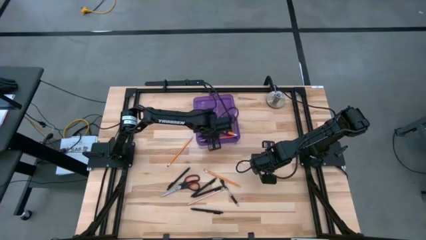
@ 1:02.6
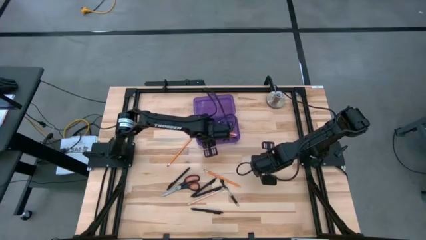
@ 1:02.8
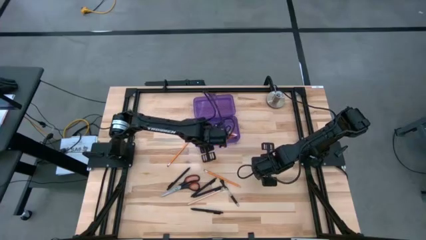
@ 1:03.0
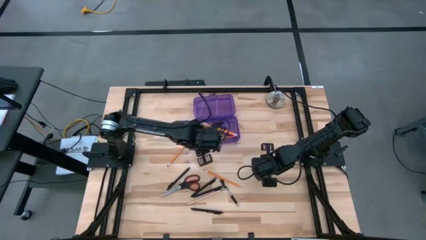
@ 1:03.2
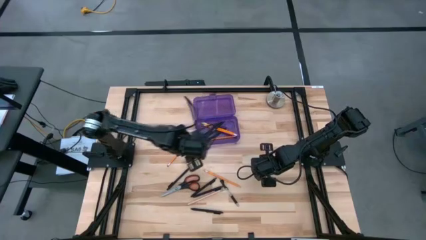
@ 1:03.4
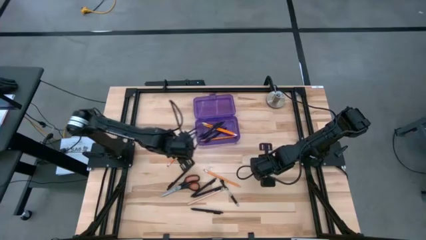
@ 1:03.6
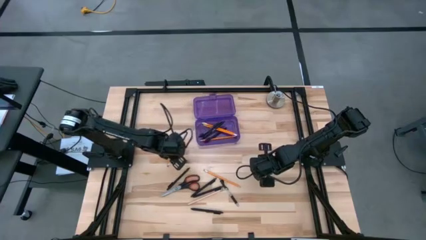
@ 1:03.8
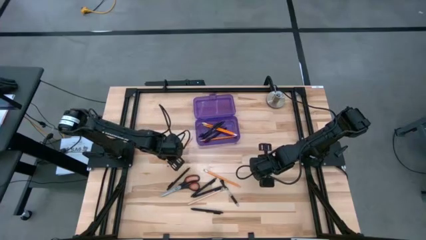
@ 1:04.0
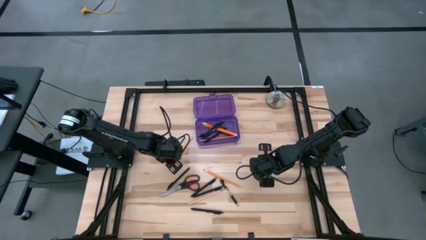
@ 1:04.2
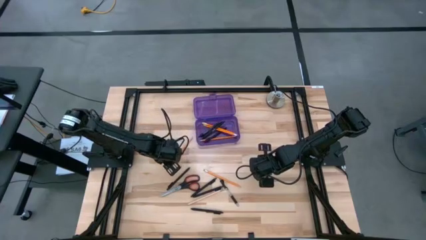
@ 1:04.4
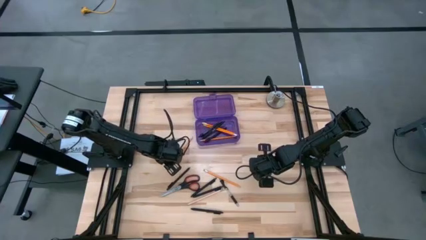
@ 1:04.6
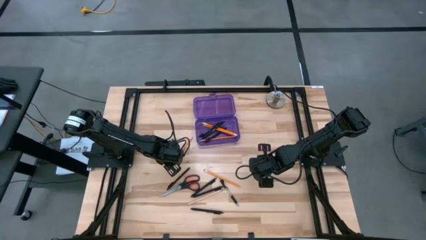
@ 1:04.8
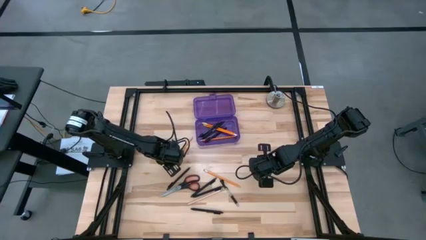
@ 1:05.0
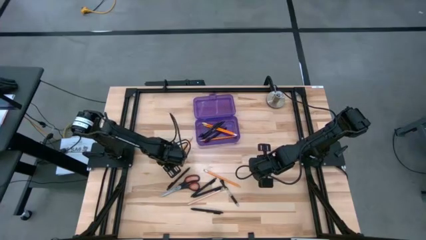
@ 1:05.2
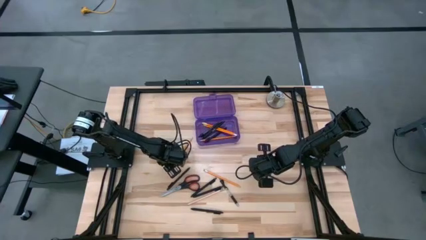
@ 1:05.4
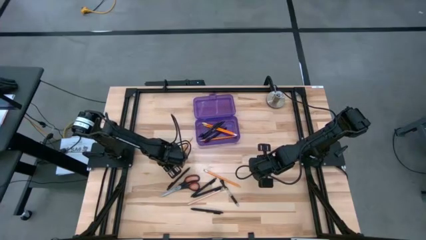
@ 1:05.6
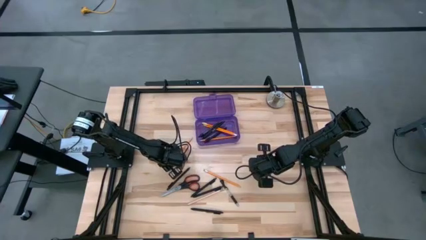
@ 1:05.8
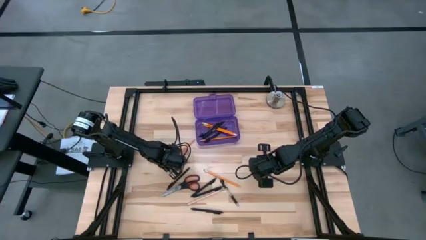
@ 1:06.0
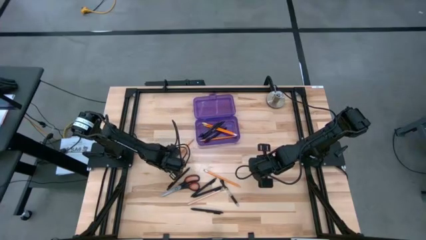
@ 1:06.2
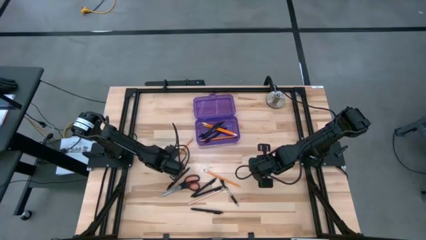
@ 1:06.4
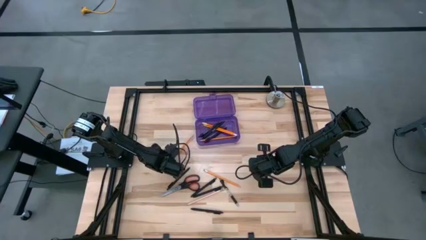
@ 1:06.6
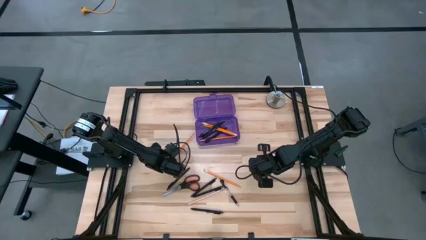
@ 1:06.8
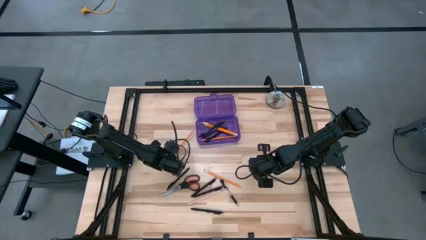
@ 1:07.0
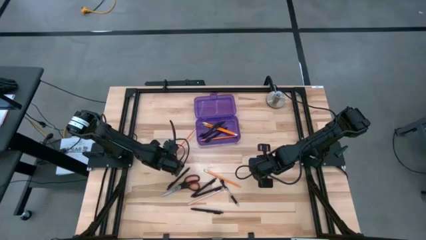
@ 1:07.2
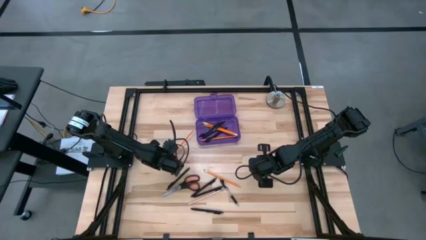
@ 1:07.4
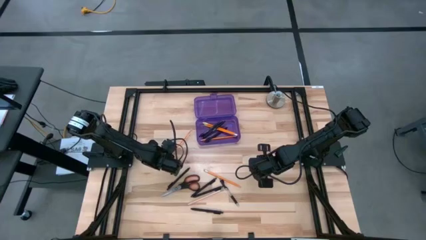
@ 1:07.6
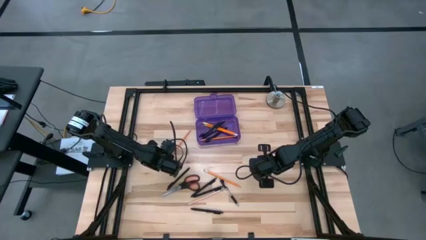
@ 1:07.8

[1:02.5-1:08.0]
Task: Pick & place school supplies into a supply box
Put the yellow pencil into the purple supply box

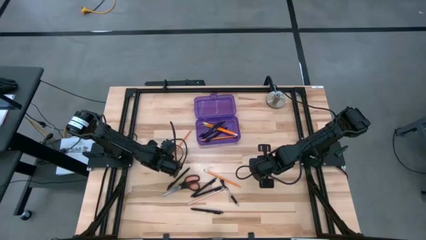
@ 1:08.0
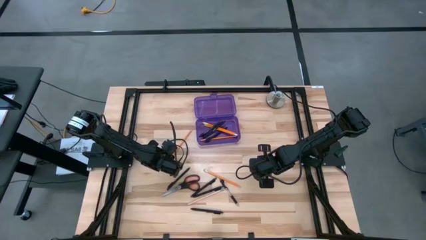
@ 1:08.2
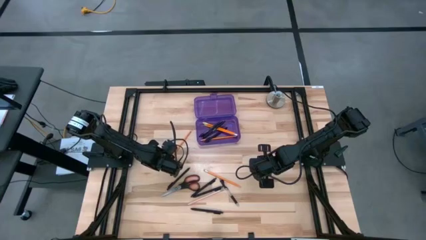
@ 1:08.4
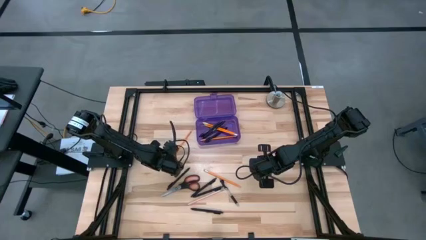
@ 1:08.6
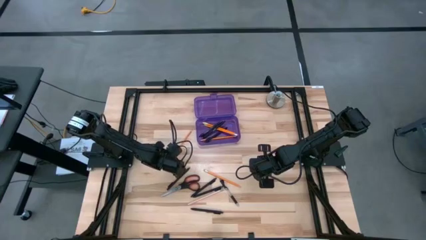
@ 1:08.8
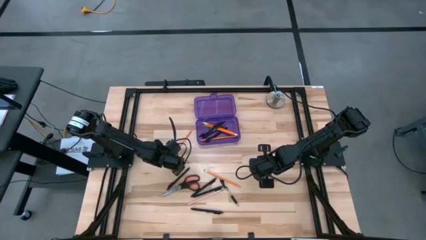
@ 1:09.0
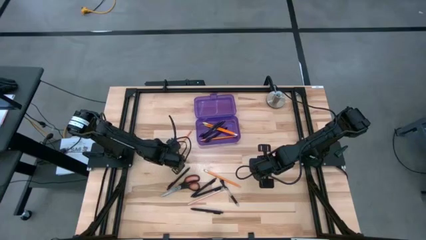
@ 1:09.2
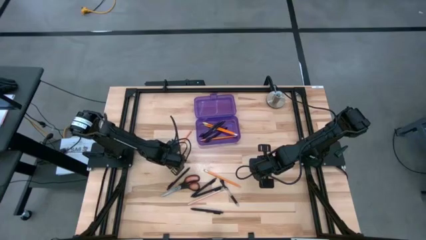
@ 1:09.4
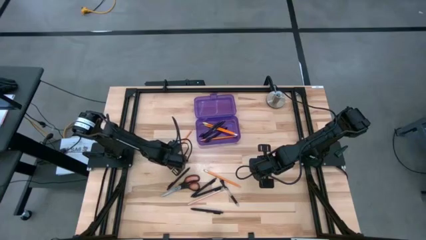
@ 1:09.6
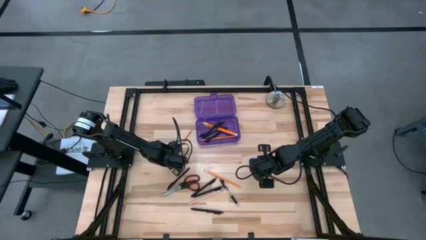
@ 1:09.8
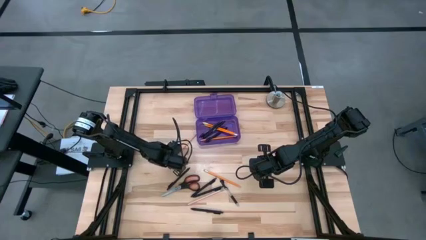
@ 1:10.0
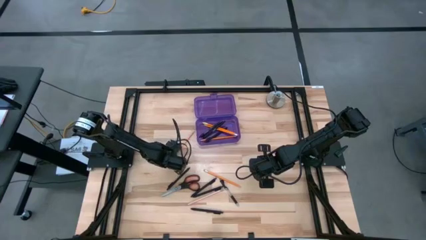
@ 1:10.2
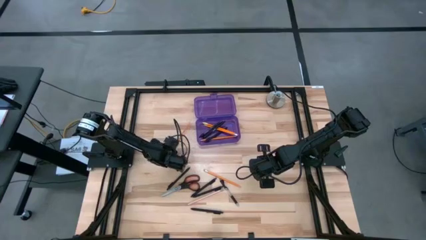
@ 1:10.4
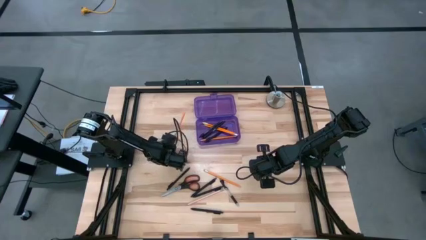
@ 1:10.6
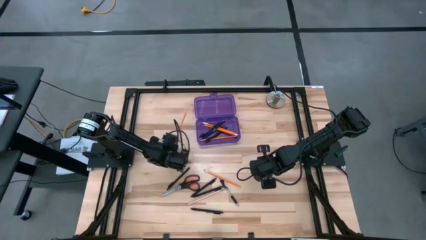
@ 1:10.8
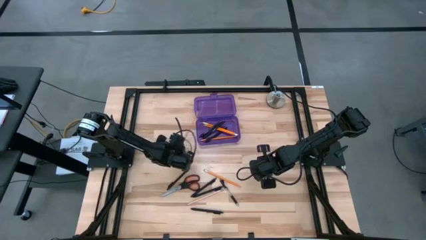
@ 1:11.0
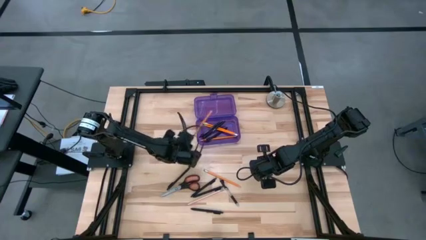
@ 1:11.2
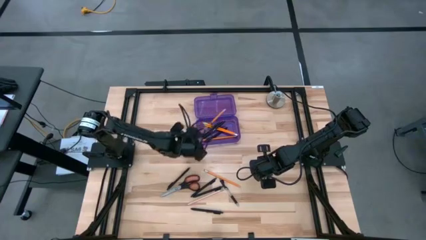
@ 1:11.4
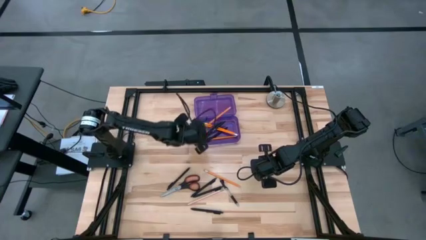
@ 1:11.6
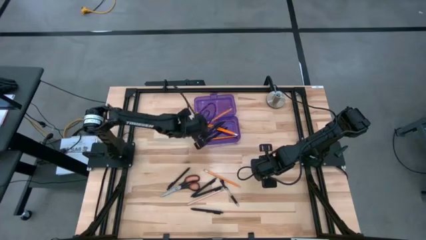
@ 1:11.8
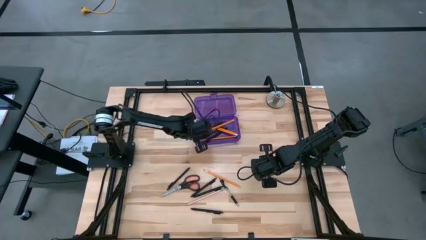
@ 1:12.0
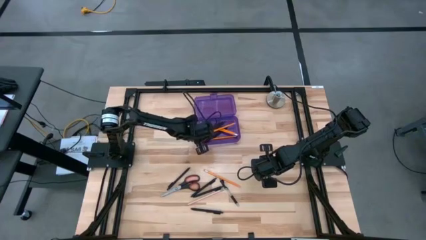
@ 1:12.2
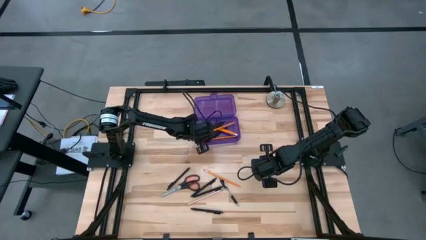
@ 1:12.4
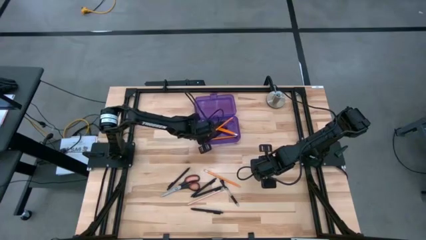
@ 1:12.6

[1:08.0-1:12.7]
Put the yellow pencil into the purple supply box

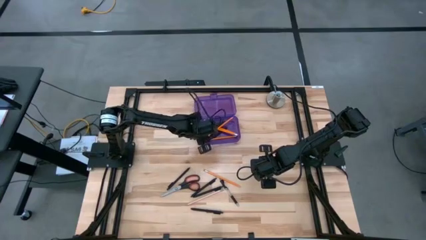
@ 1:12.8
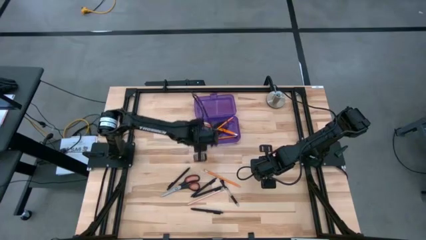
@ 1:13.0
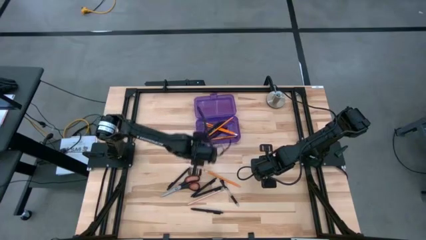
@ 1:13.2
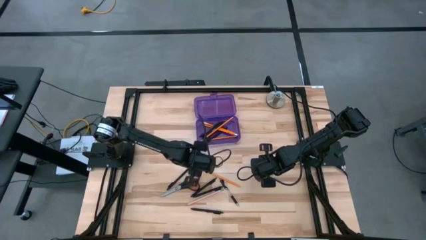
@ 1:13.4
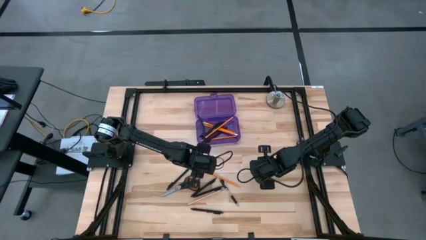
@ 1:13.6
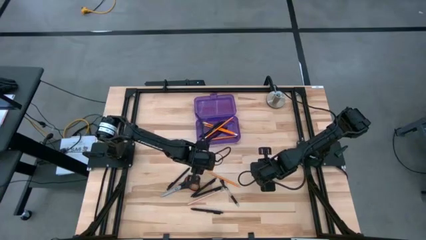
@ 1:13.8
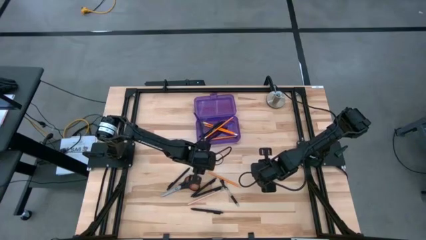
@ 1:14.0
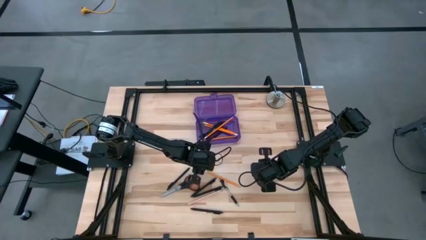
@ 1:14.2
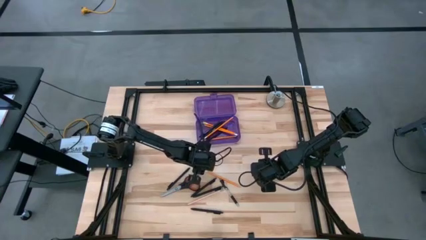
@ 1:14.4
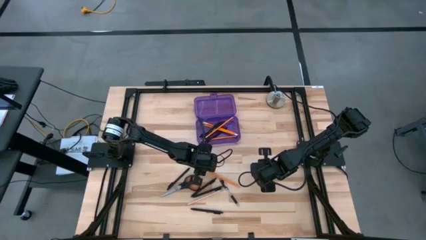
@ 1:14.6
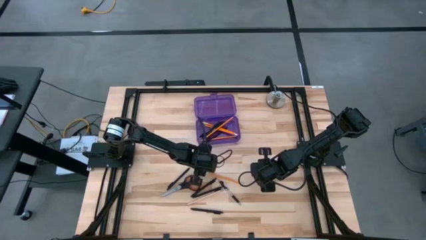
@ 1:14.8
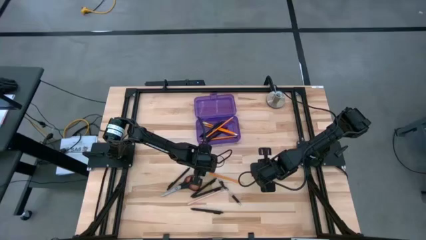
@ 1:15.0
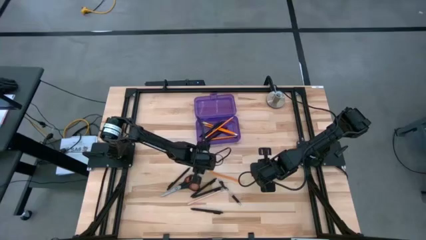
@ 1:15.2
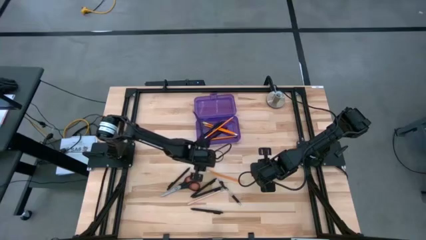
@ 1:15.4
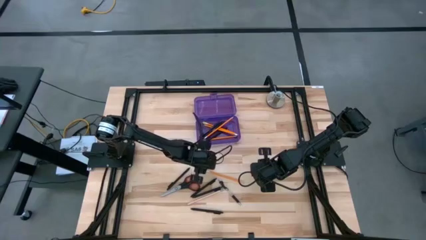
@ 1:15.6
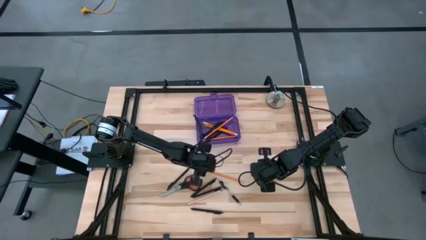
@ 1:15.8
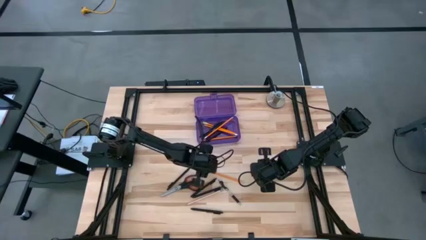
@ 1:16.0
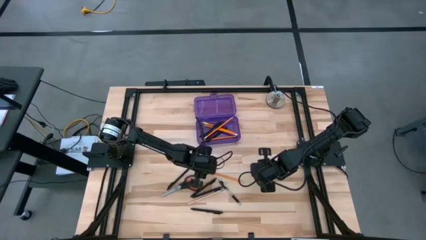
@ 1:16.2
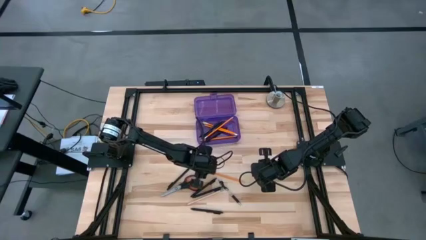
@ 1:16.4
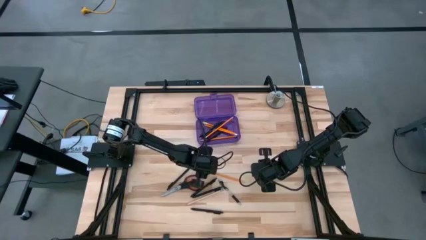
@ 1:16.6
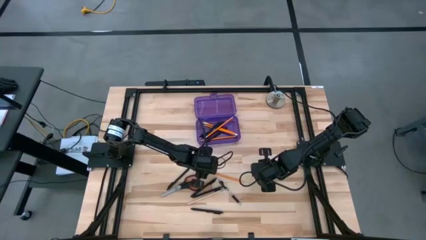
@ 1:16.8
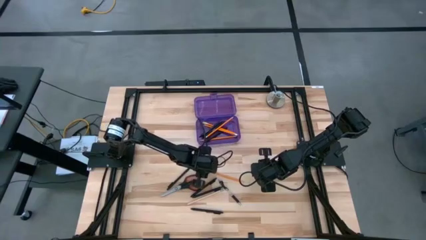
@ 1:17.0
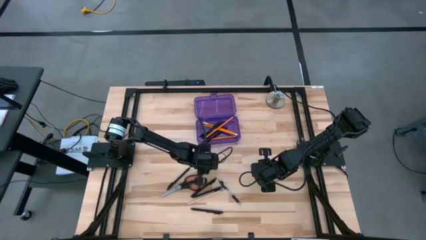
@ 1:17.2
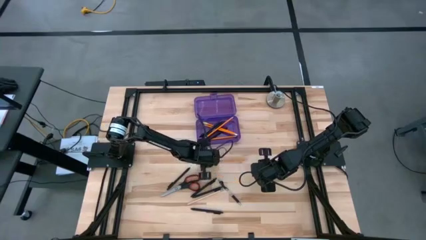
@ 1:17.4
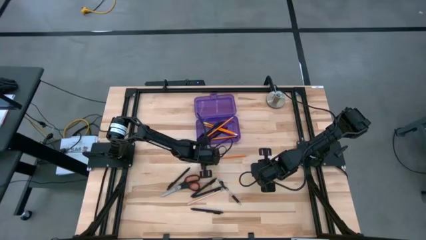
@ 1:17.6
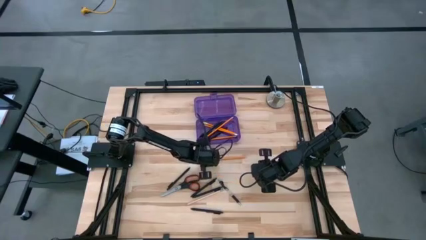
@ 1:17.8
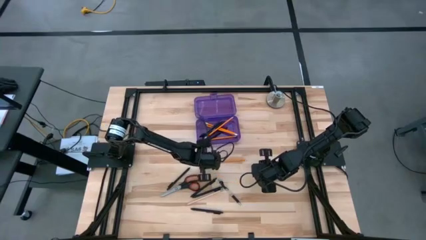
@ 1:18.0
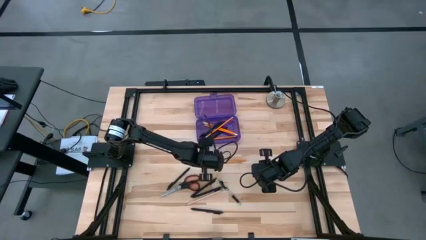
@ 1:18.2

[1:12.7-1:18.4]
Put the yellow pencil into the purple supply box
